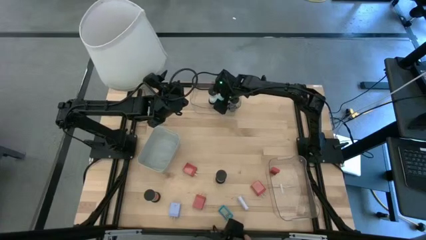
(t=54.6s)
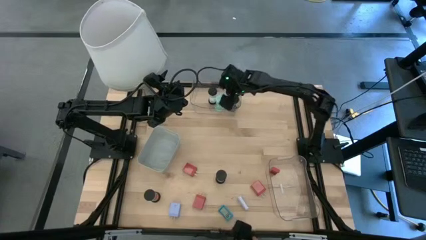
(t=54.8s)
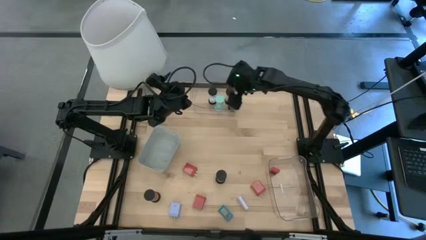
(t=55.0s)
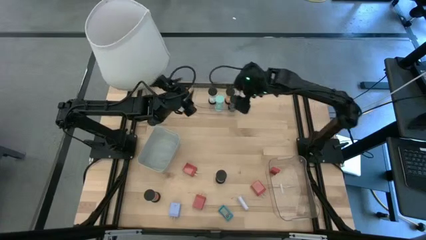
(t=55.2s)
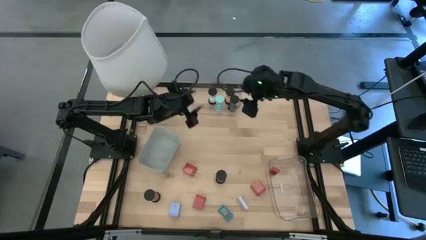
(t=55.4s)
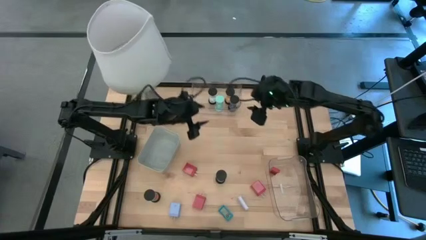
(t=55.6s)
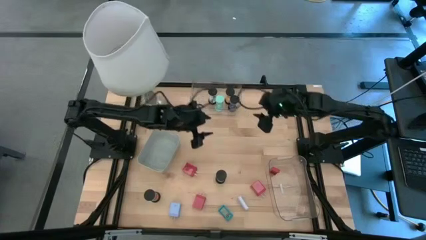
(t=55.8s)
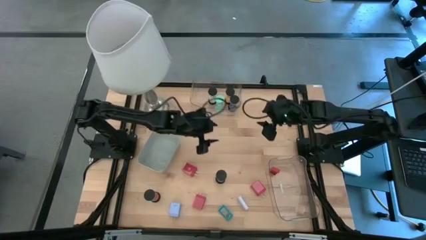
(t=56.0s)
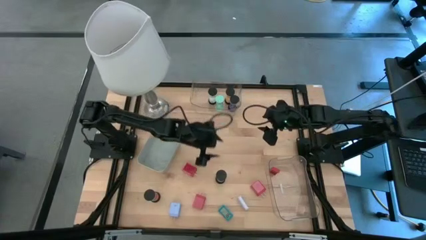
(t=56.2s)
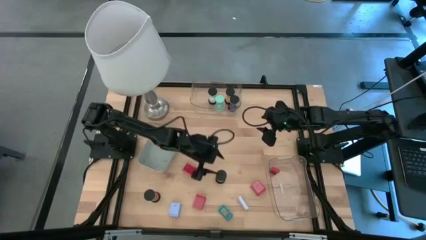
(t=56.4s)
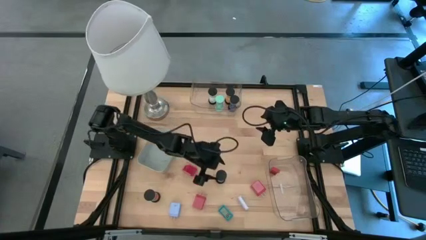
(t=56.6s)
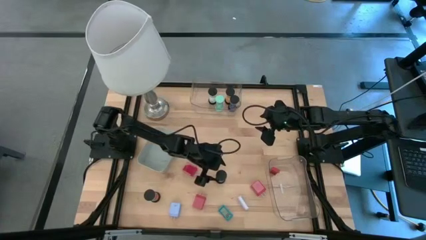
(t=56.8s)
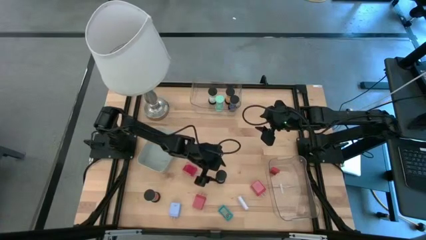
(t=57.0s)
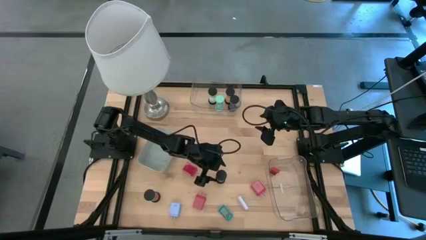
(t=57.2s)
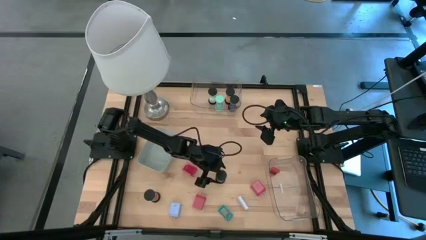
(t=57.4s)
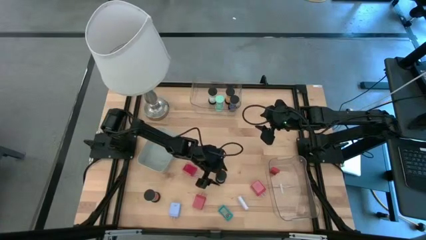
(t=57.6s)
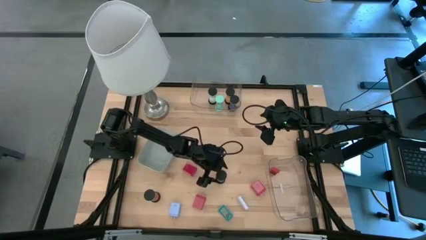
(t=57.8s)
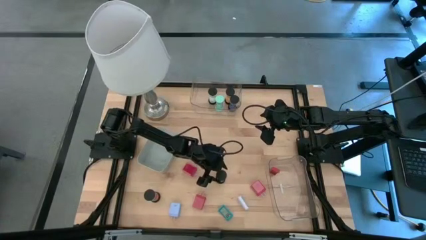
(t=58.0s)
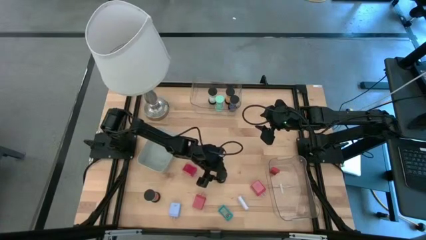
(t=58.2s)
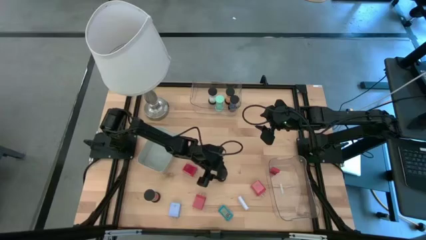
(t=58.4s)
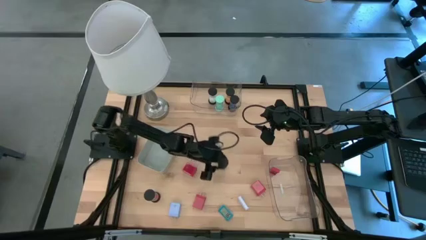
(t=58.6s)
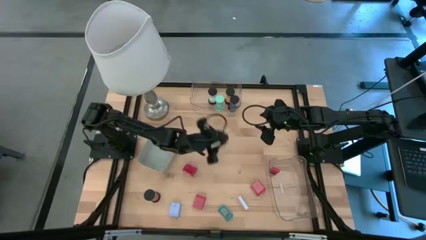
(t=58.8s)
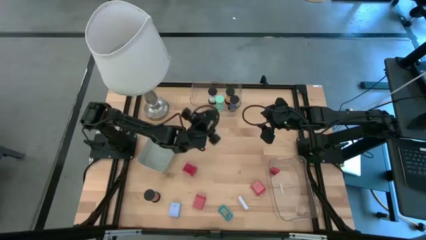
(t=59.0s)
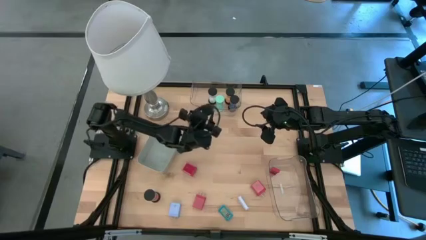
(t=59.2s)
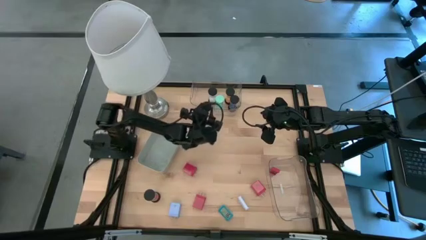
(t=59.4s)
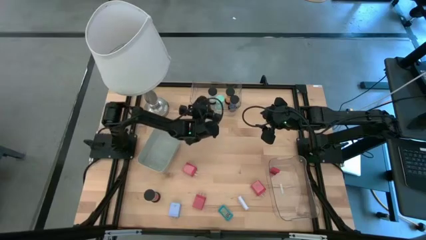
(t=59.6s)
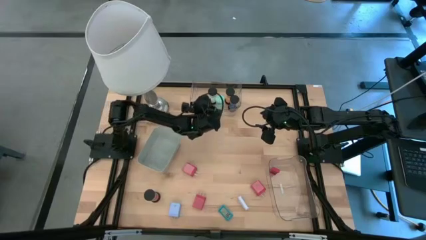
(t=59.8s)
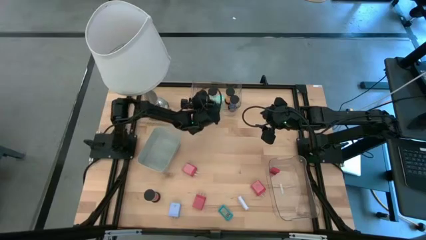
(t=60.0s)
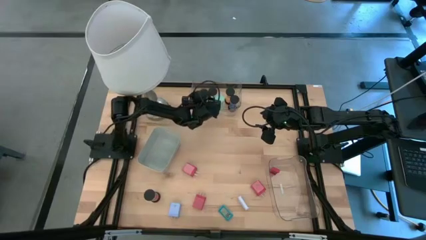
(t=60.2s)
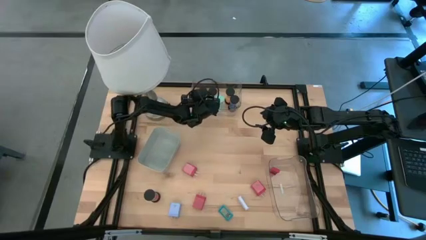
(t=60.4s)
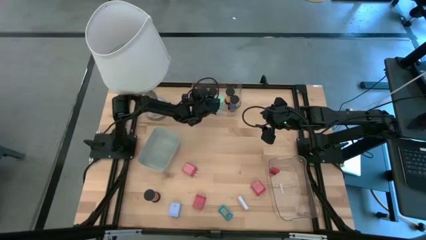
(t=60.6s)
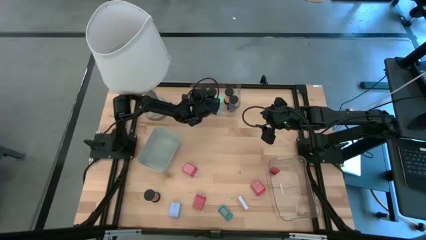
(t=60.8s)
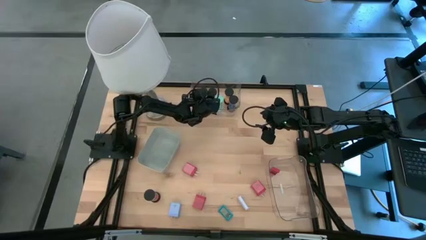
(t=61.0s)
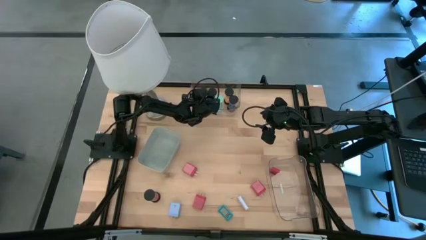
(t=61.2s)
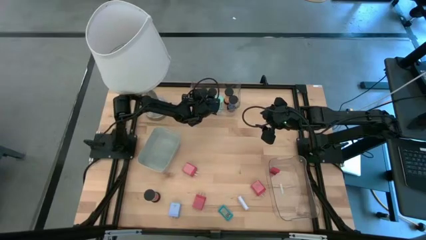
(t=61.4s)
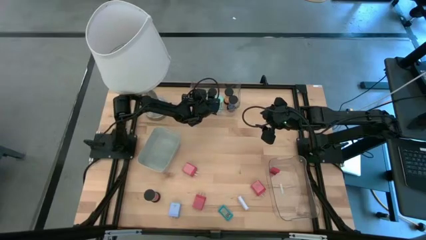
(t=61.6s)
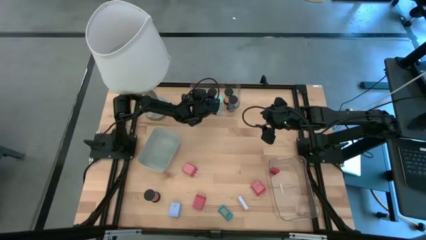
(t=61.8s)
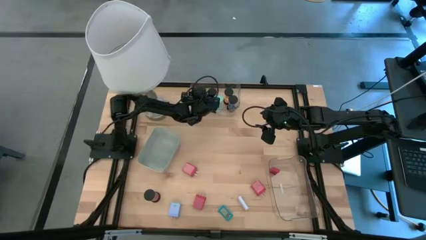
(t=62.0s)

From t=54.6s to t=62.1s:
Task: Pick & Place Office items
Put the blue hourglass into the top transparent bin

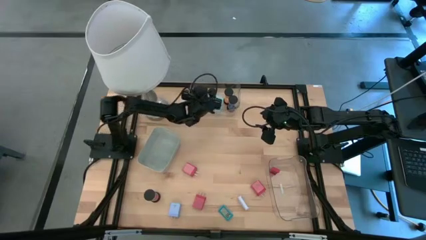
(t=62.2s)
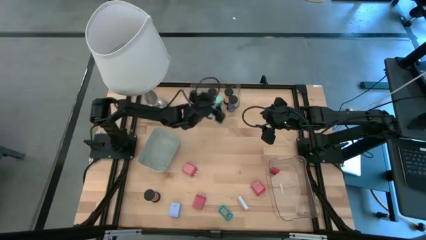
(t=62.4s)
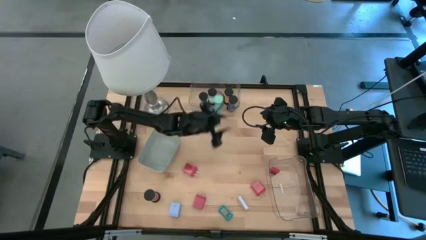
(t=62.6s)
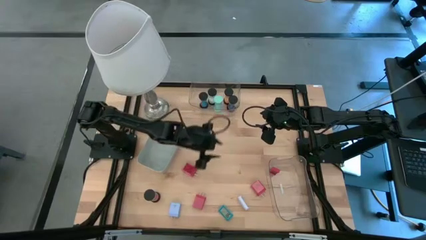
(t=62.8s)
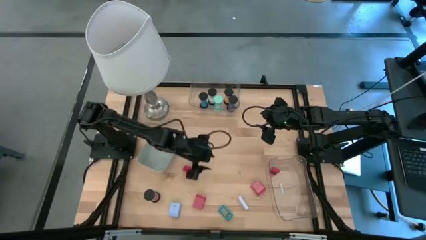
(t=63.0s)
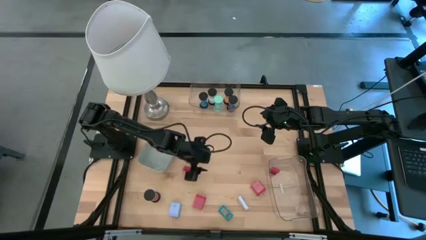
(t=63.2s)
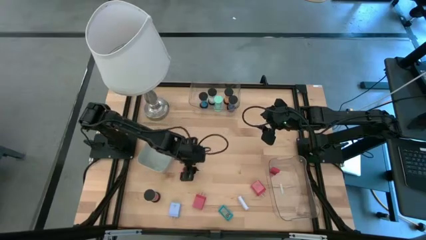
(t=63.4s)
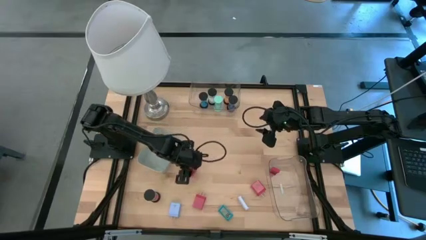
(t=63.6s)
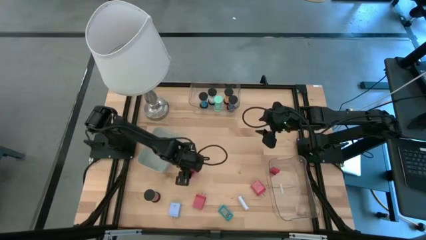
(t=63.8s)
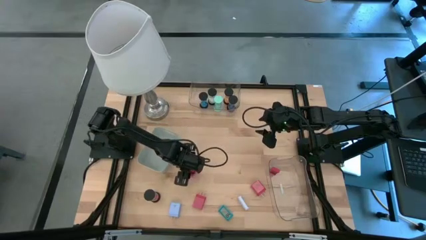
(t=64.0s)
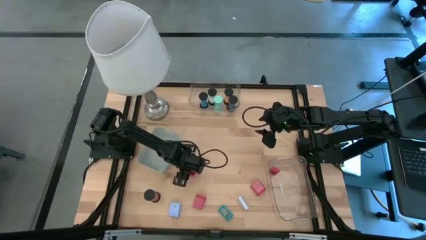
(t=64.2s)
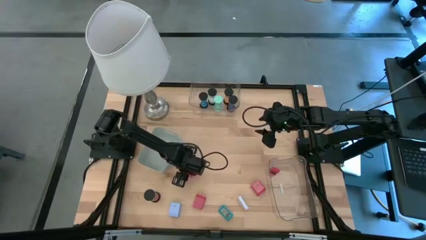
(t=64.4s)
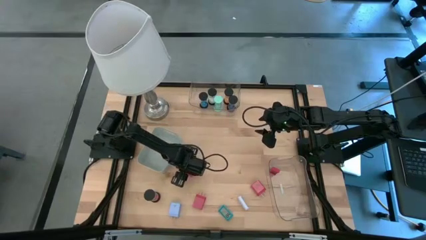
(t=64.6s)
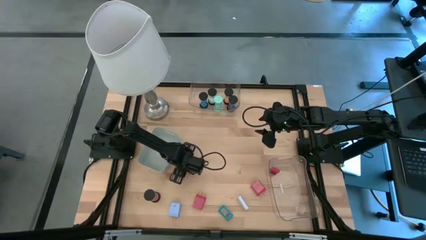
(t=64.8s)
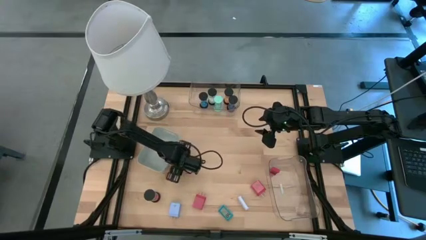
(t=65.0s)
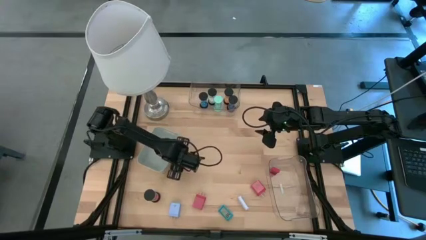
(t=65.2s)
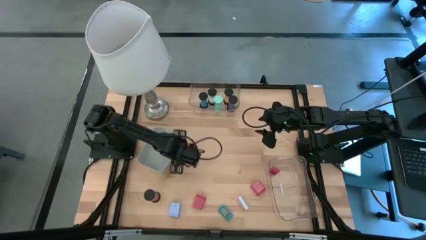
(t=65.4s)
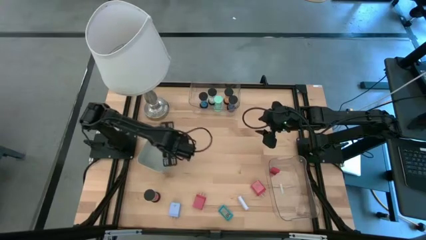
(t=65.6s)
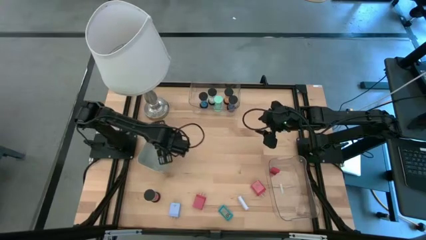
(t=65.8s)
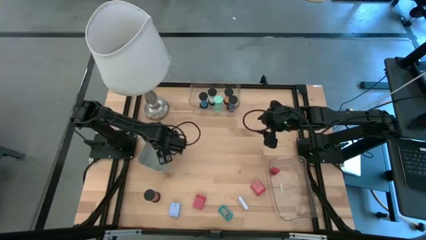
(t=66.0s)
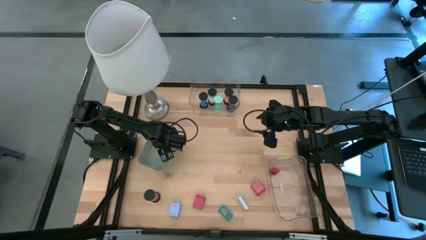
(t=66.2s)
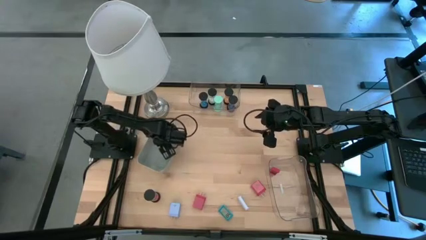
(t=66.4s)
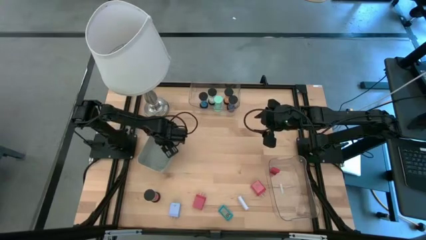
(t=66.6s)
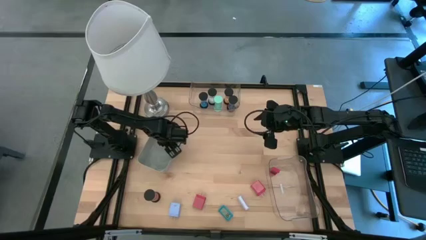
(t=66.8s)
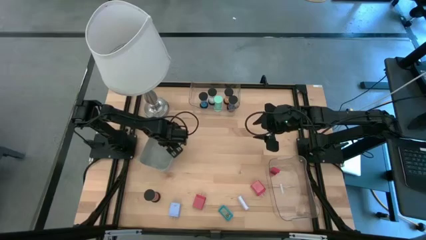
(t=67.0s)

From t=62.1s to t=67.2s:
Put the top left red charger adapter into the gray bin

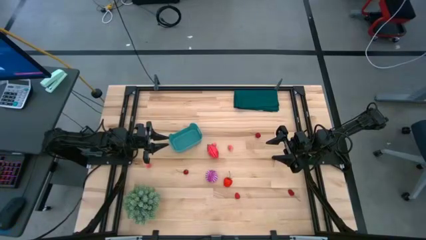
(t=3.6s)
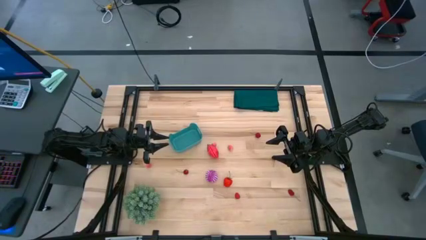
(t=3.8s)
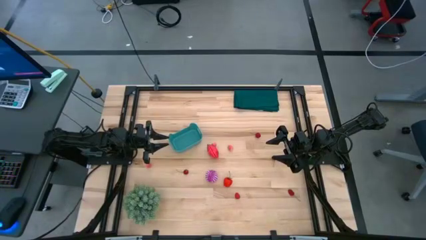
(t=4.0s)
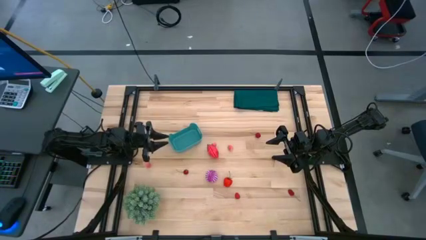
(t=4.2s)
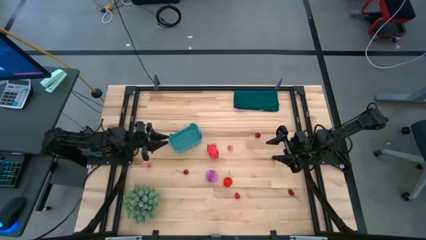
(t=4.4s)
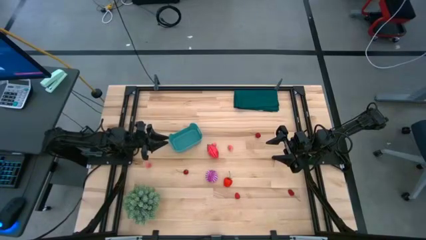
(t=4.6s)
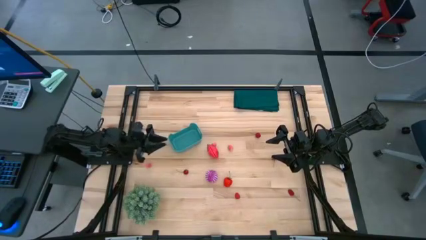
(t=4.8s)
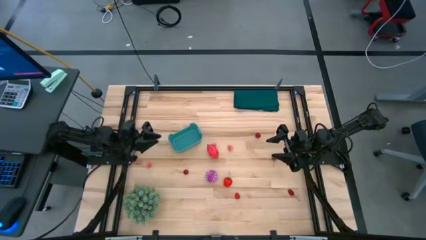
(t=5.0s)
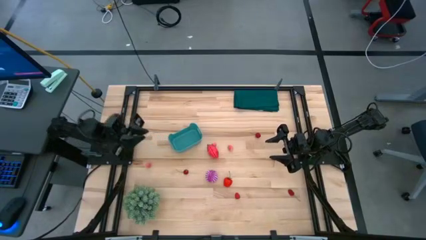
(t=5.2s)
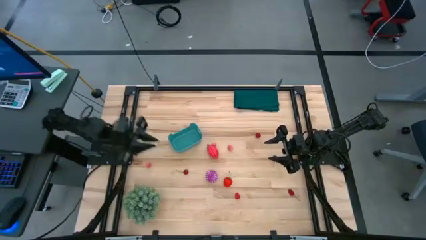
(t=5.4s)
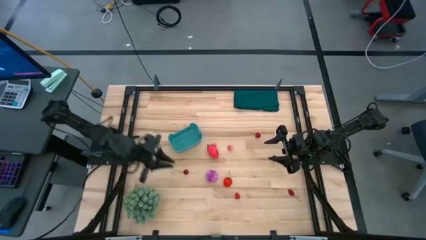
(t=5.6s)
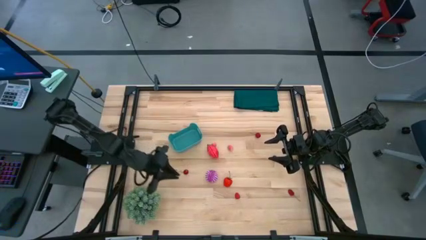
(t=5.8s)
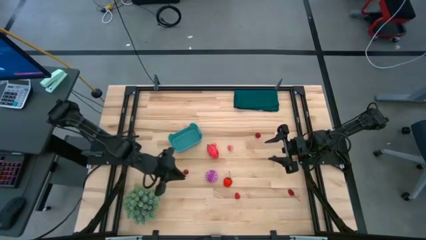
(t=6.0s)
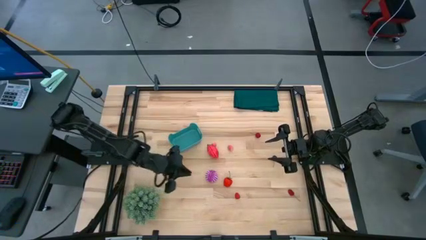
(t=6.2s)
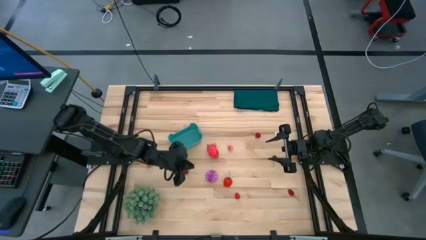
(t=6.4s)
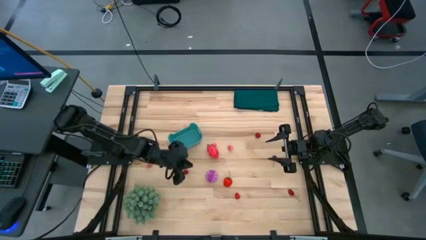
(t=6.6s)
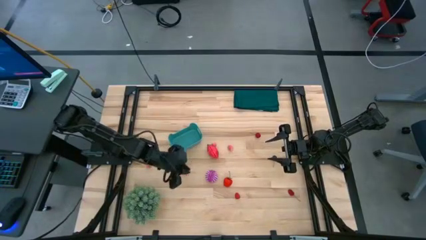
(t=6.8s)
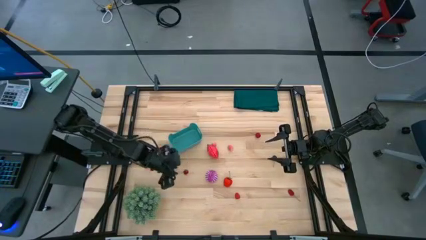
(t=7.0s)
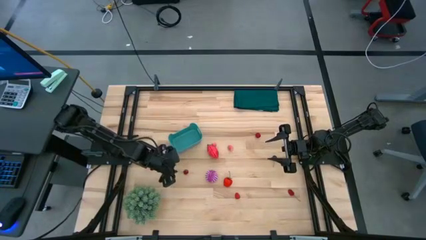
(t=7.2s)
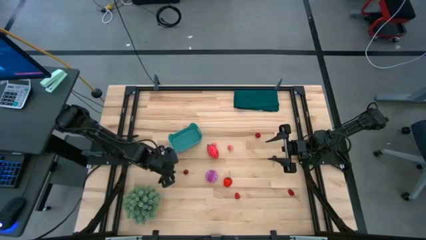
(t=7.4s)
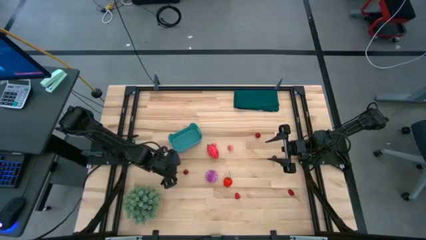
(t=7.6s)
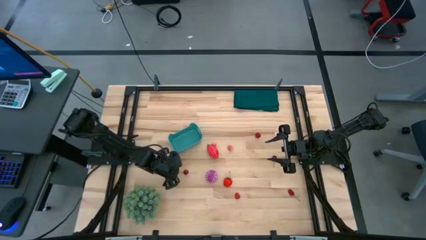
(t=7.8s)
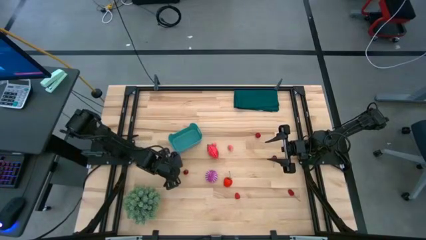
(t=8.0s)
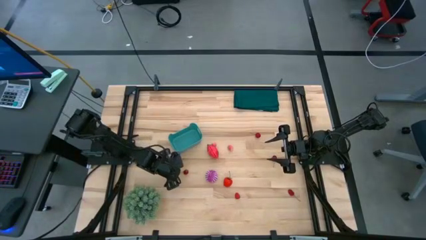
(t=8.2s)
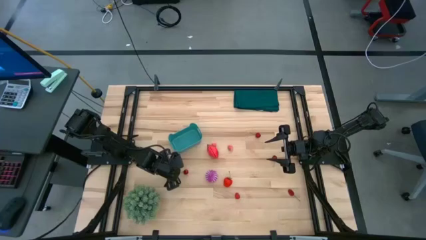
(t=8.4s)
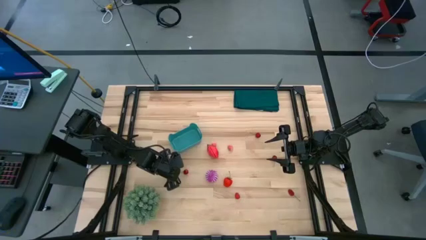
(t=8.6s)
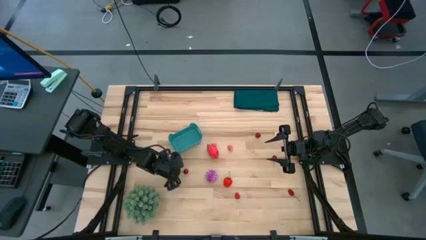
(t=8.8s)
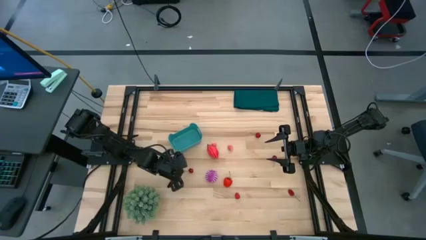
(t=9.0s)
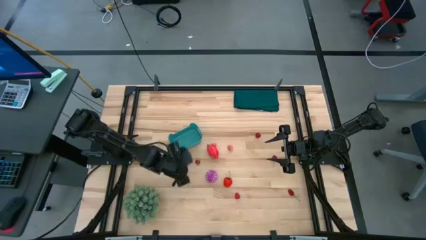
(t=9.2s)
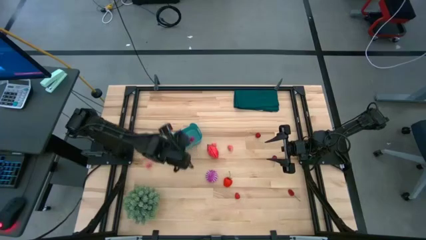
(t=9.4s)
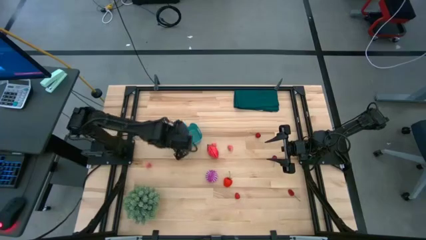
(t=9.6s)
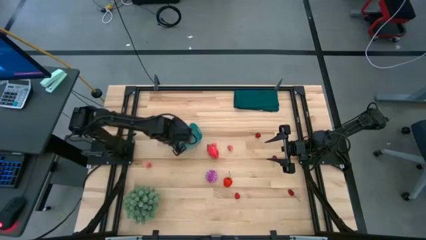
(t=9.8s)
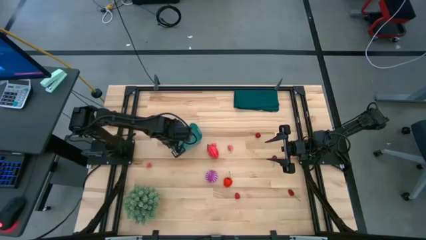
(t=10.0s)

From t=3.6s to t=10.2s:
Task: Pick and placing Produce into tupperware
Put the red cherry into the blue bin
